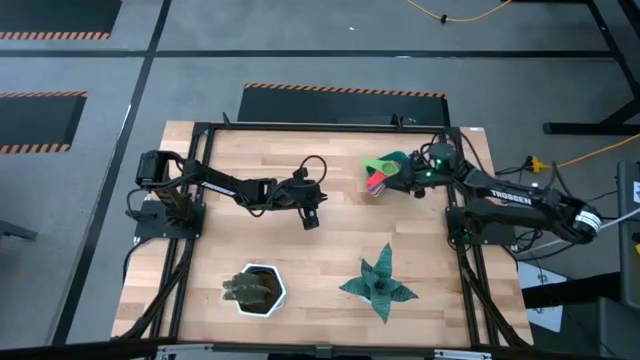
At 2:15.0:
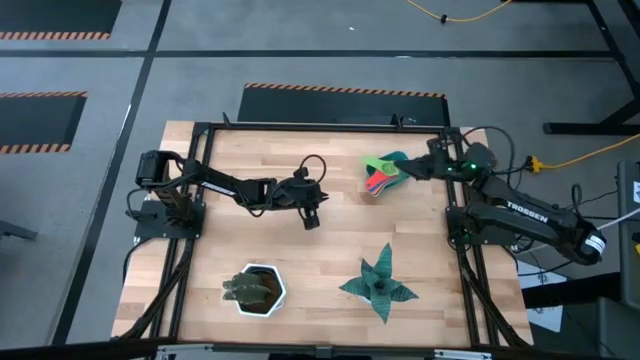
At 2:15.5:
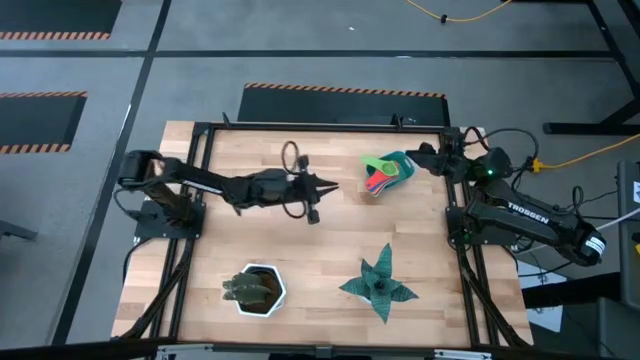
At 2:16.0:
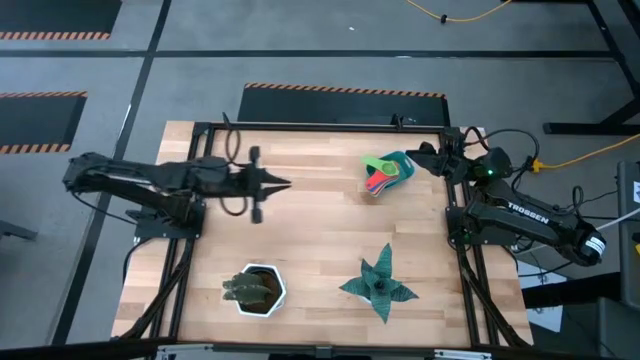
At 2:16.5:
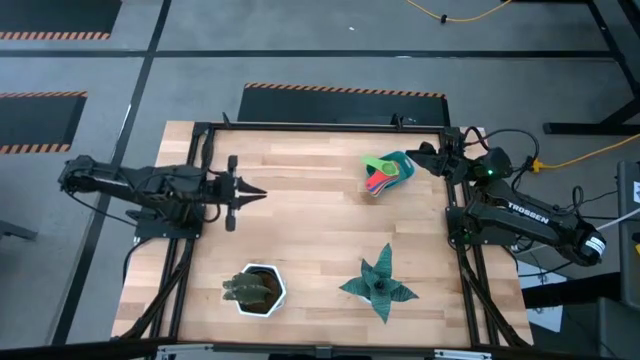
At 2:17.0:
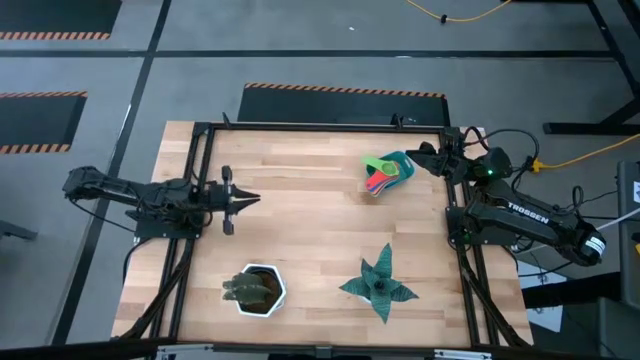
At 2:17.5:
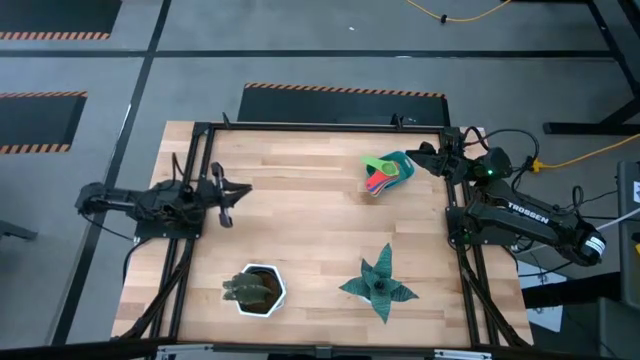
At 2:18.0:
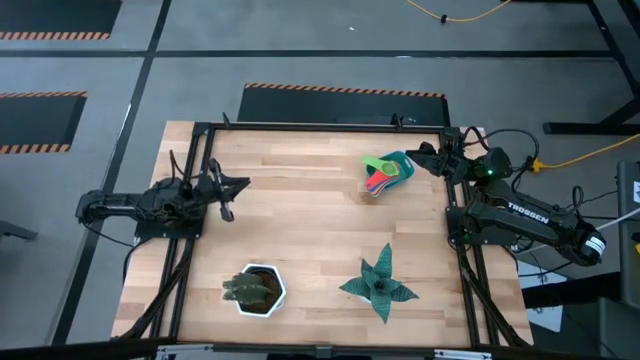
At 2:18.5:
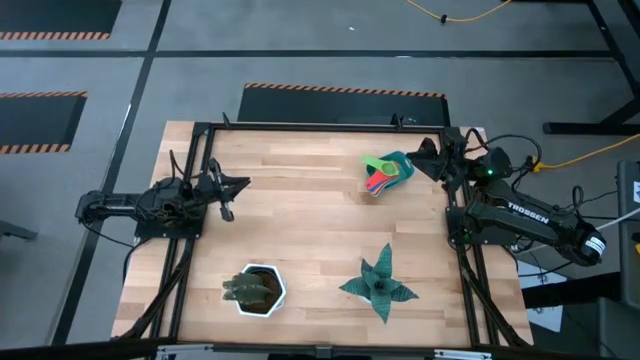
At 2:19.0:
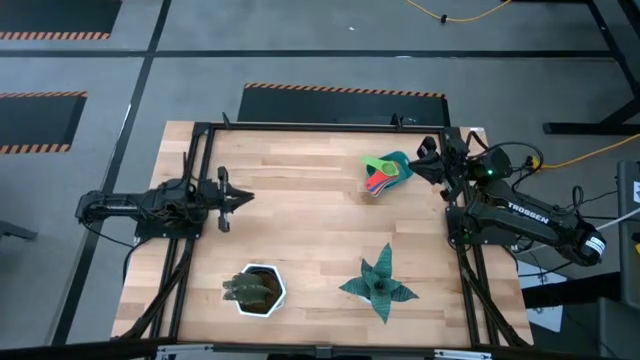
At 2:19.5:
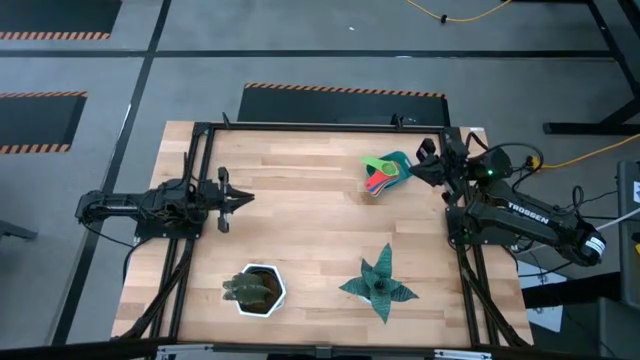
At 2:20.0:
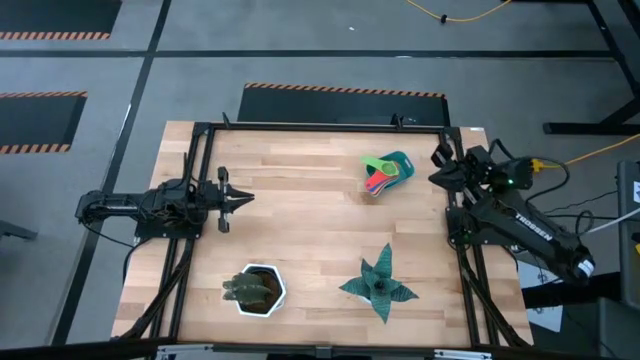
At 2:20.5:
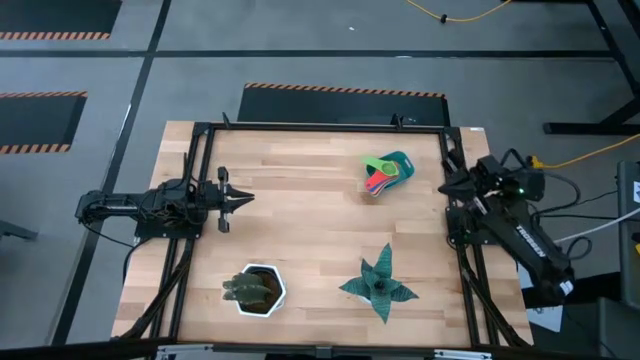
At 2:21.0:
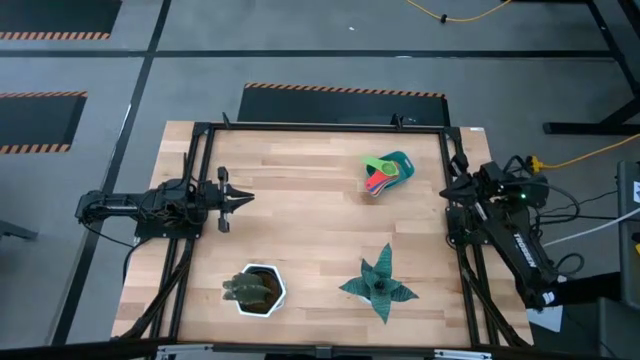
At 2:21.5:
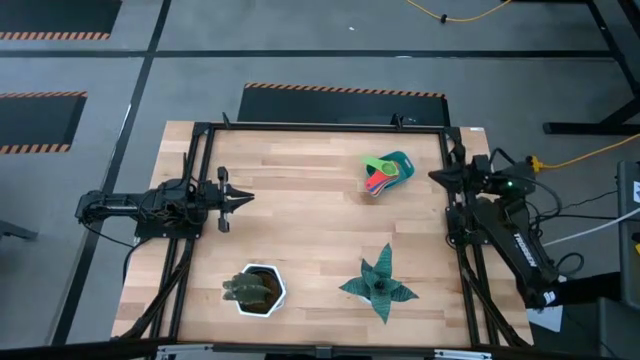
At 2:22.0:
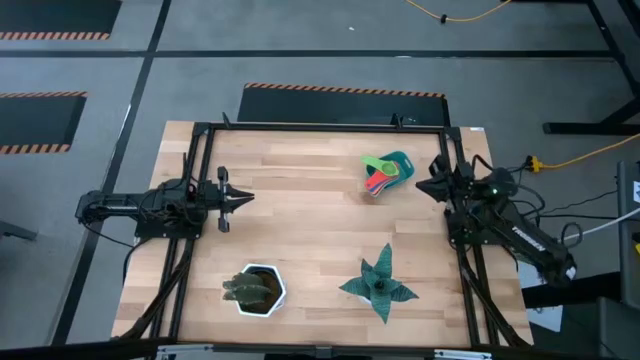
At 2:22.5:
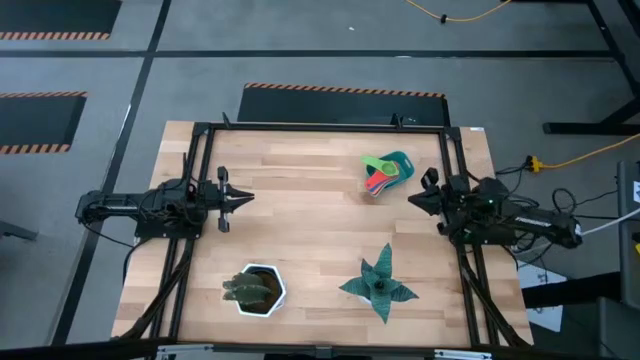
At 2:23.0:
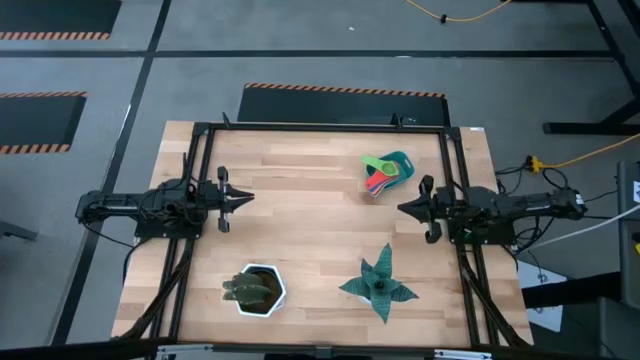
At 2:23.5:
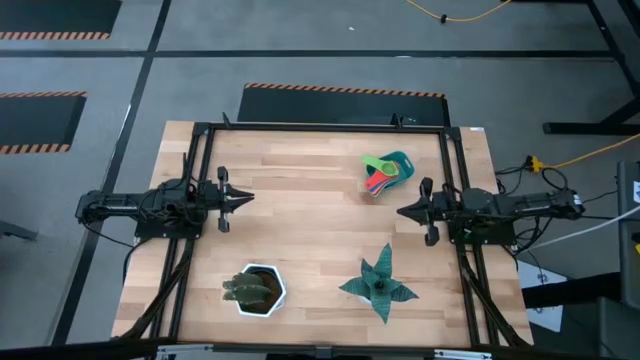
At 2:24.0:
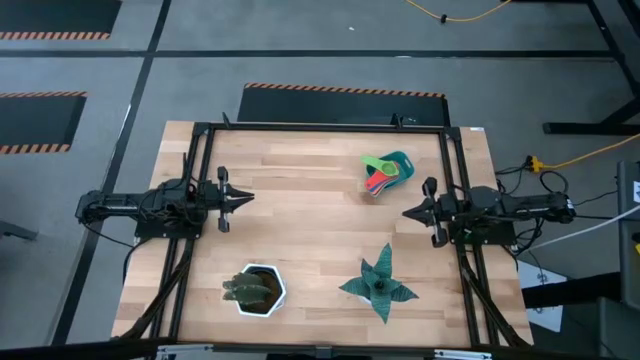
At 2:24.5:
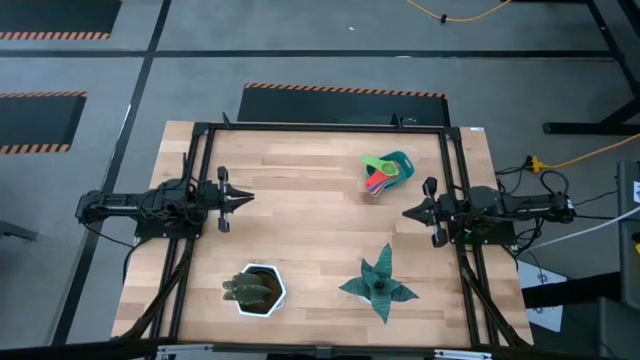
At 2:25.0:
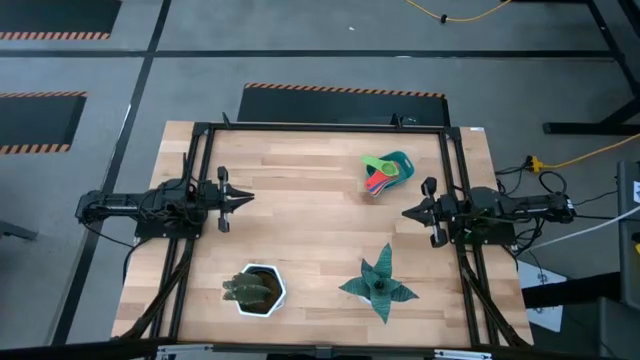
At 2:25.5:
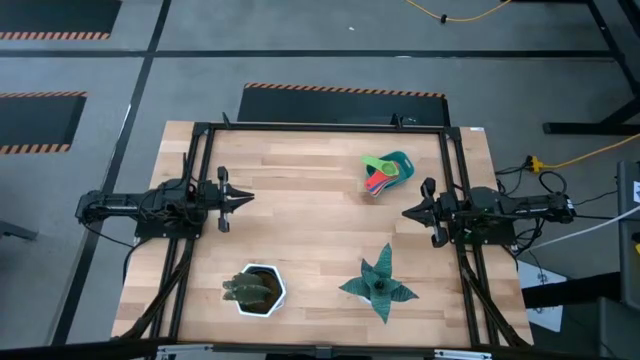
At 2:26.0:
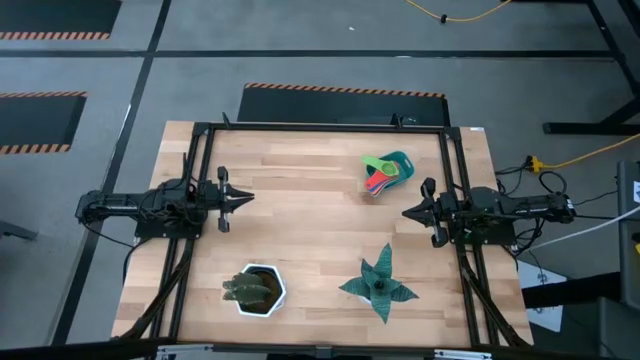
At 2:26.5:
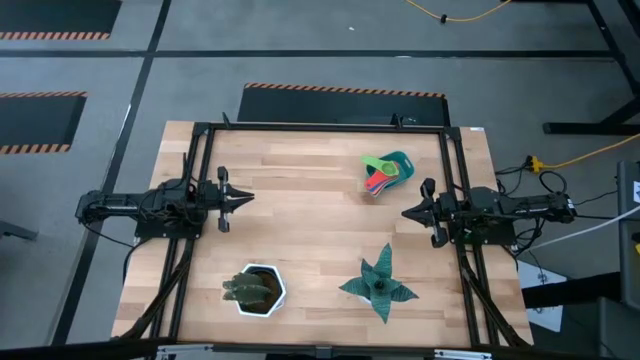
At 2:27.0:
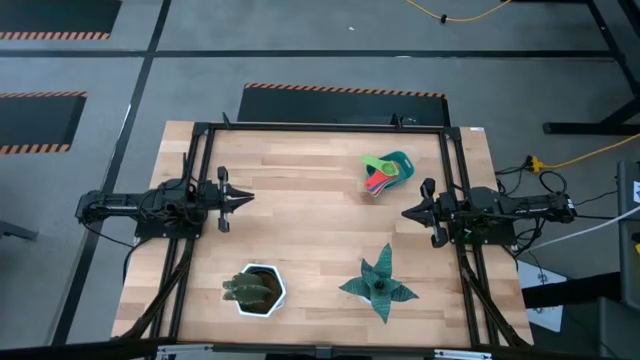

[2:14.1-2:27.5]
Task: Nest measuring cups in basket
Return to Home Position

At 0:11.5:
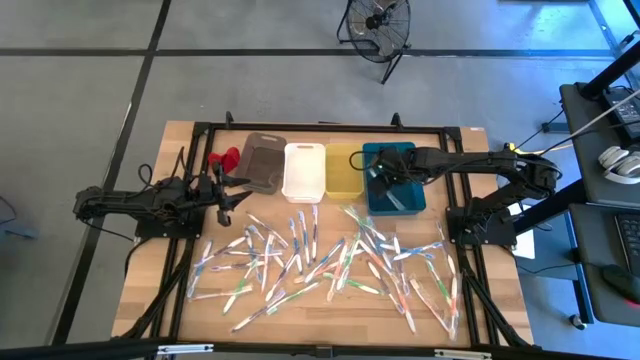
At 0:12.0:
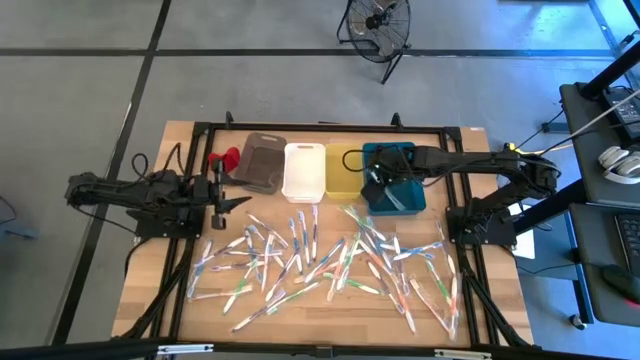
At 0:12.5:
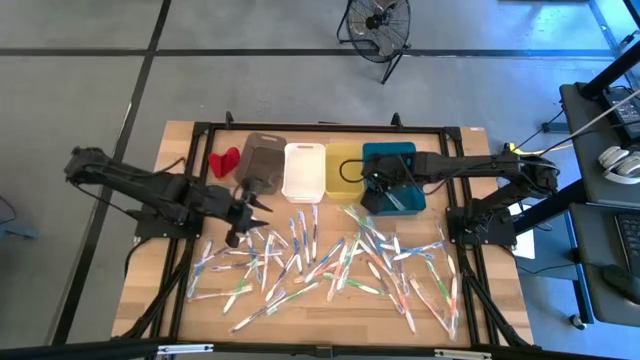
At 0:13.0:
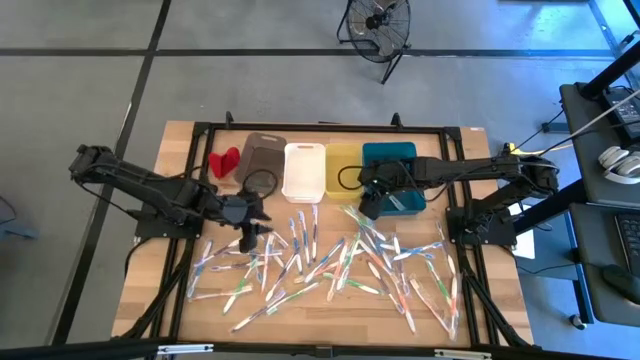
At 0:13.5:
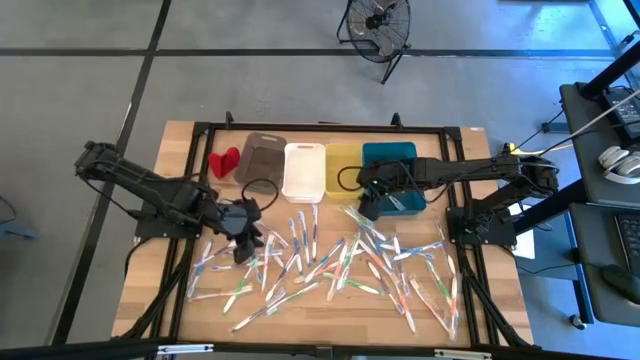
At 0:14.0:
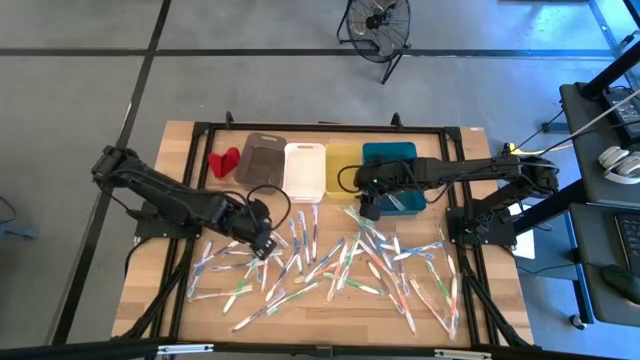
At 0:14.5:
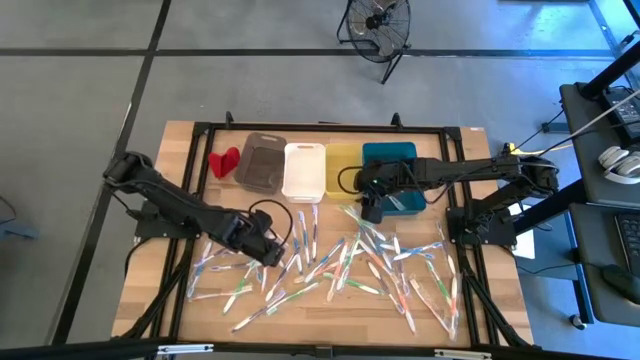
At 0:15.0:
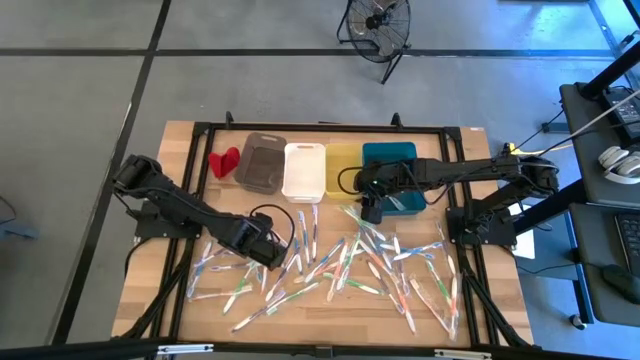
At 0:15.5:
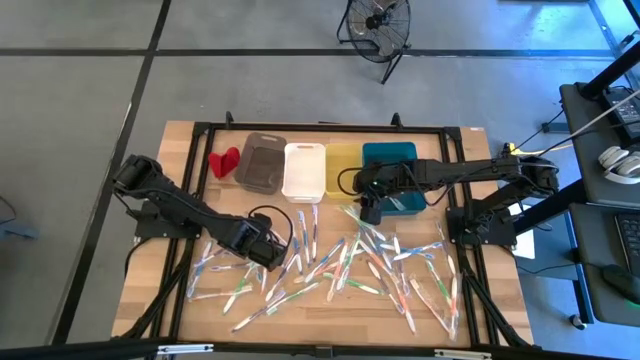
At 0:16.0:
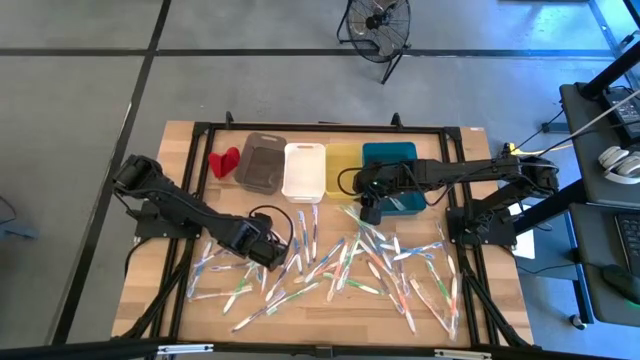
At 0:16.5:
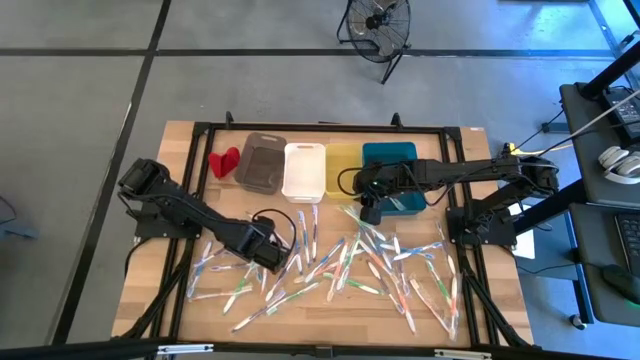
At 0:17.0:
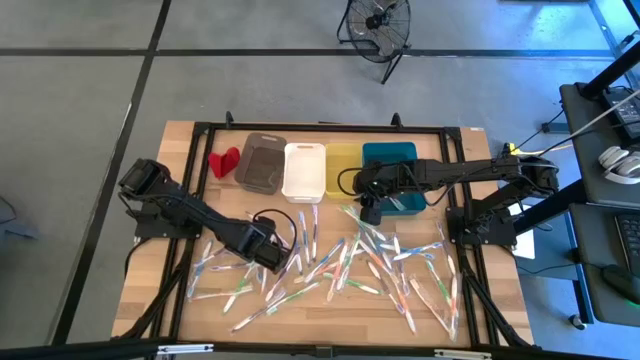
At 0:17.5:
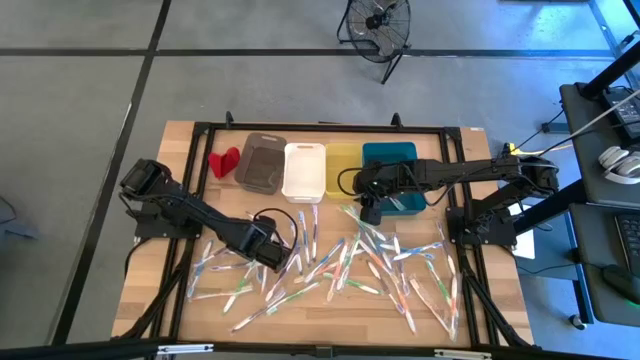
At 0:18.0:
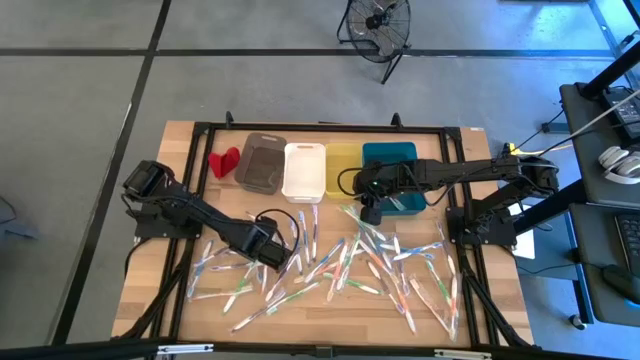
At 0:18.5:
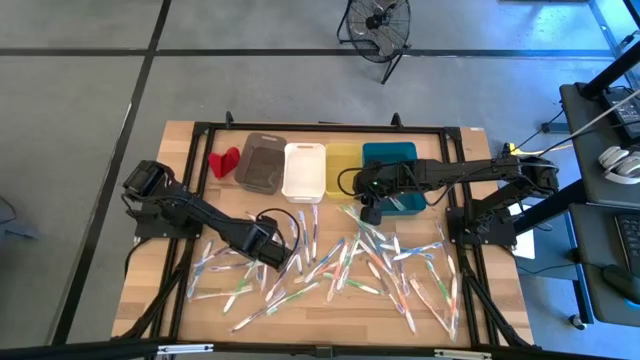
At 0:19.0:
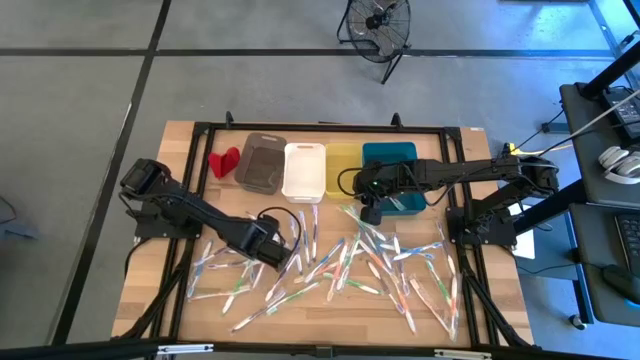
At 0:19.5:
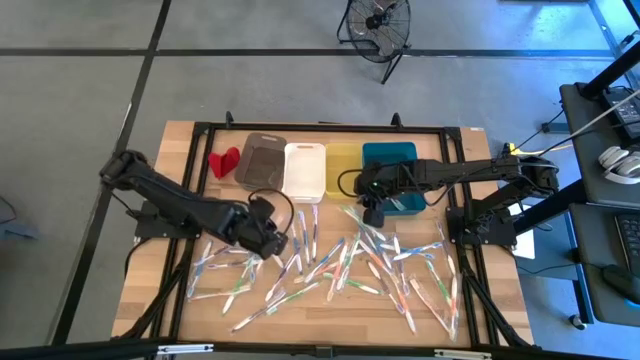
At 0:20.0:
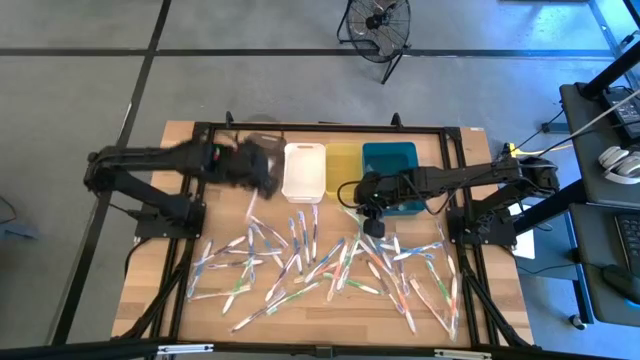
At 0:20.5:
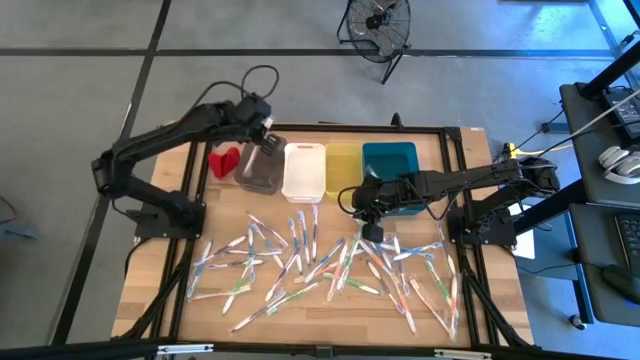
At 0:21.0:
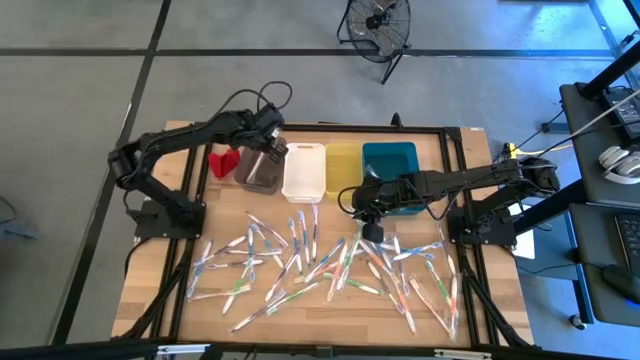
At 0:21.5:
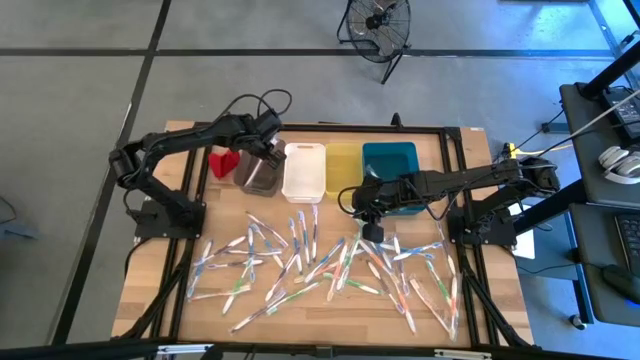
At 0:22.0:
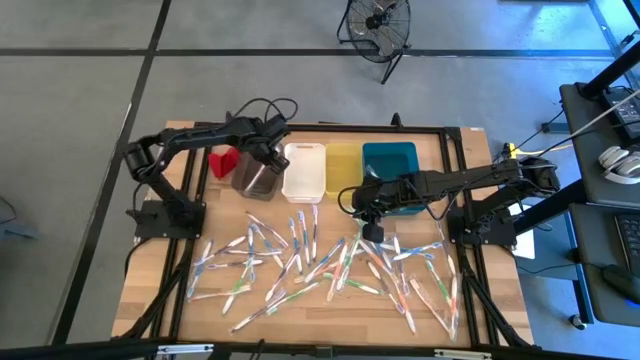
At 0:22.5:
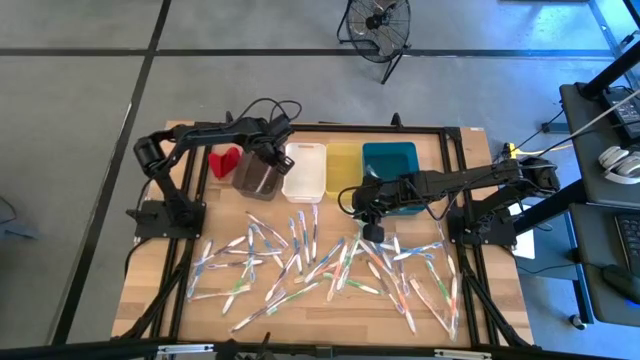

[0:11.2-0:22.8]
Task: Pick & Place Toothbrushes
Put the orange toothbrush into the black bin
